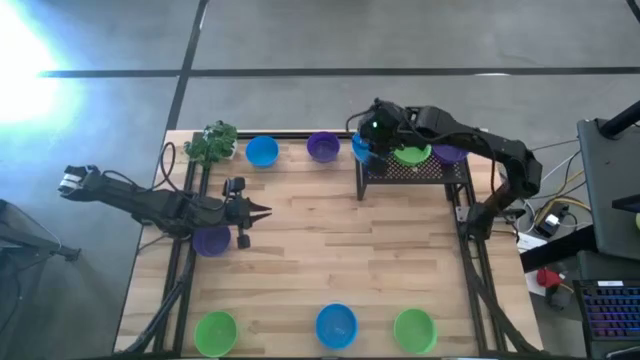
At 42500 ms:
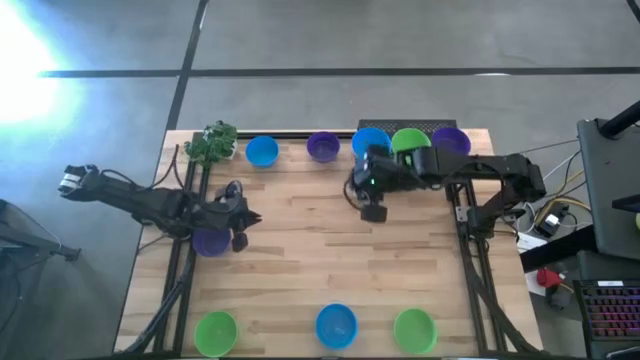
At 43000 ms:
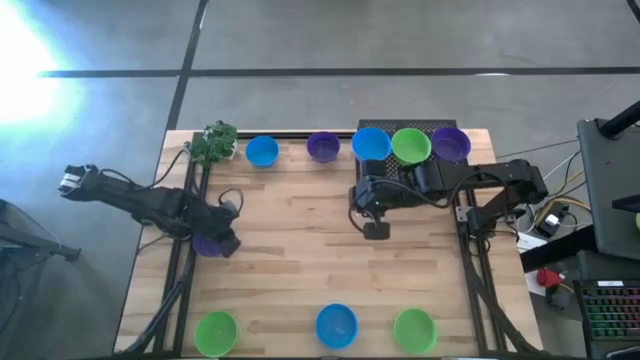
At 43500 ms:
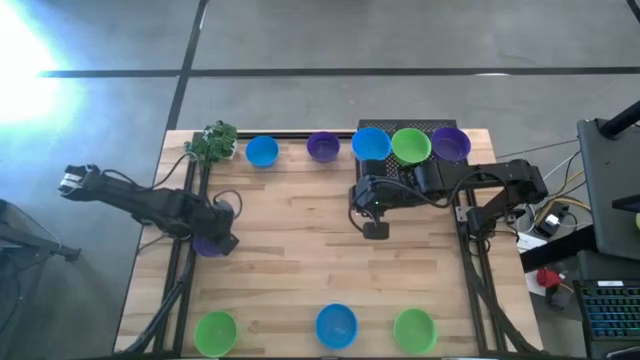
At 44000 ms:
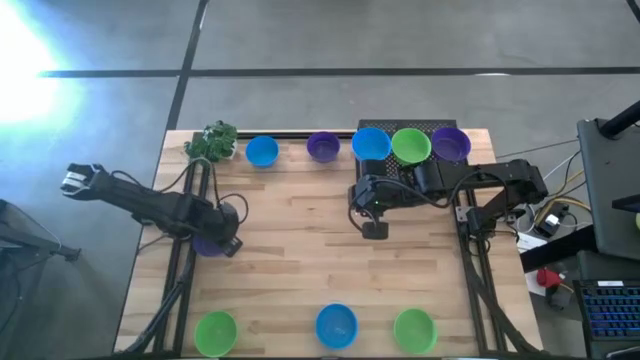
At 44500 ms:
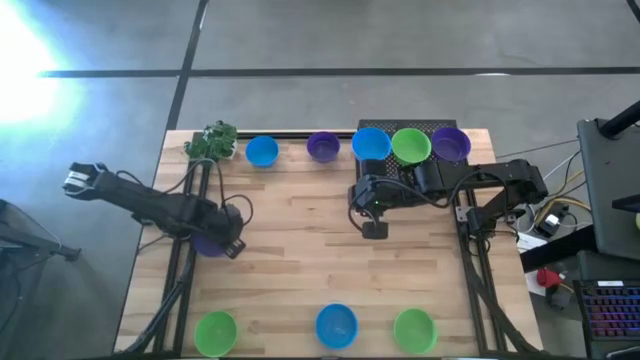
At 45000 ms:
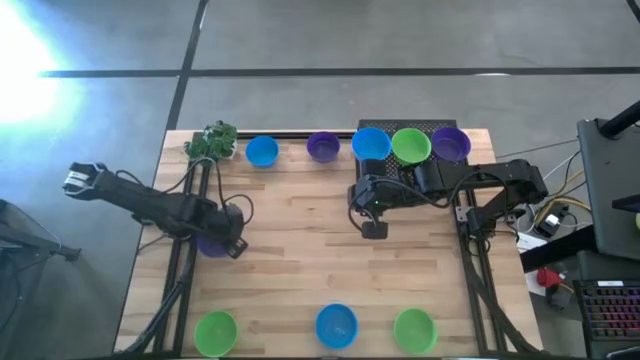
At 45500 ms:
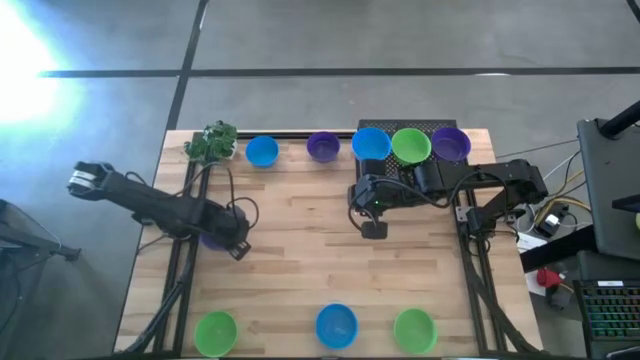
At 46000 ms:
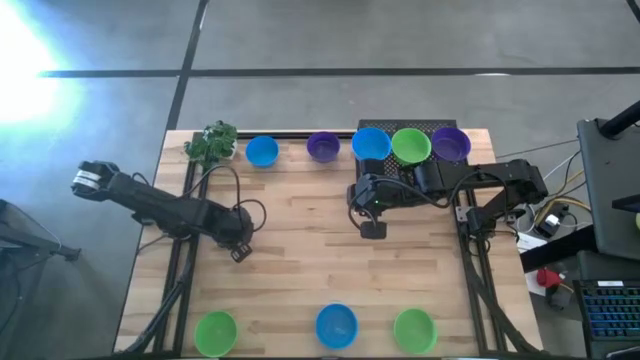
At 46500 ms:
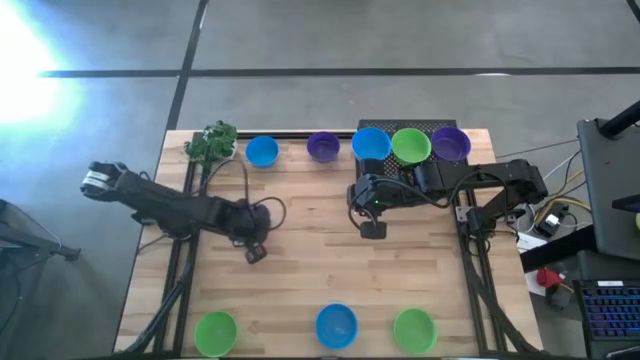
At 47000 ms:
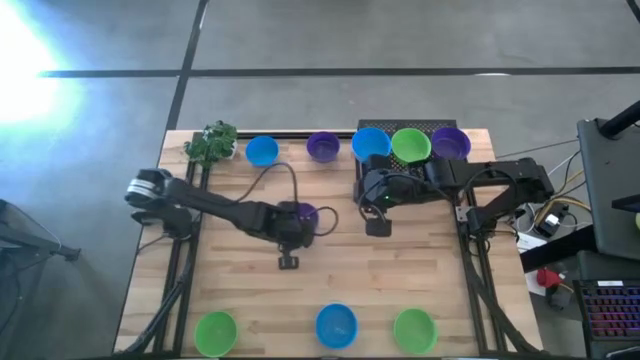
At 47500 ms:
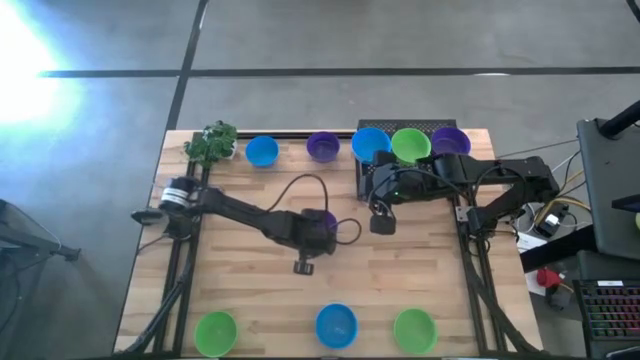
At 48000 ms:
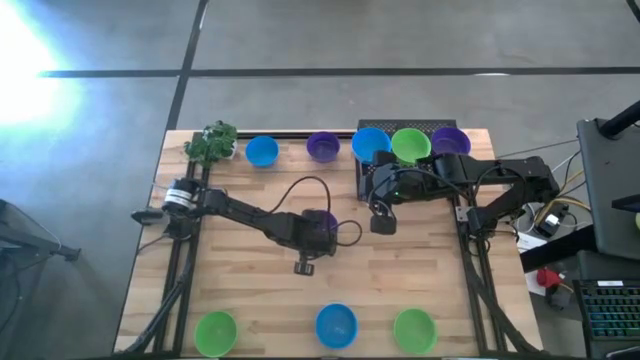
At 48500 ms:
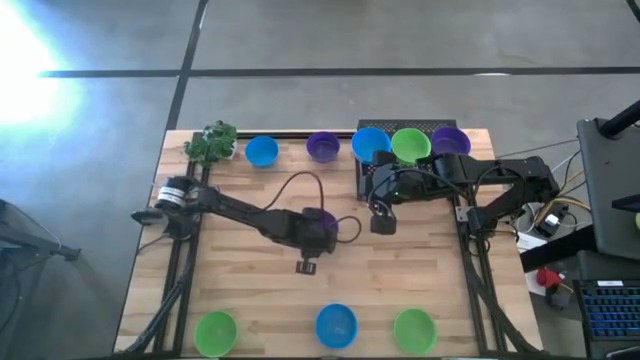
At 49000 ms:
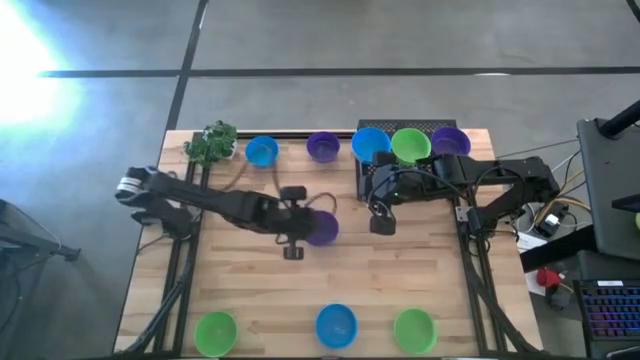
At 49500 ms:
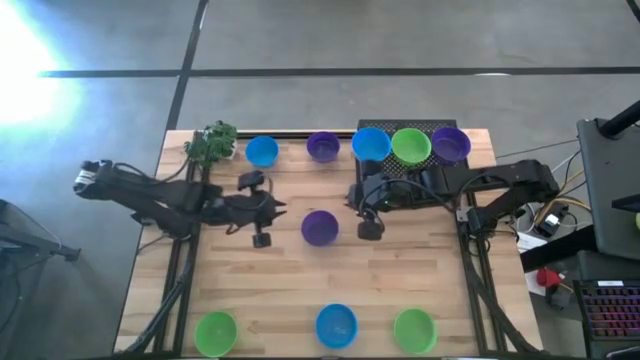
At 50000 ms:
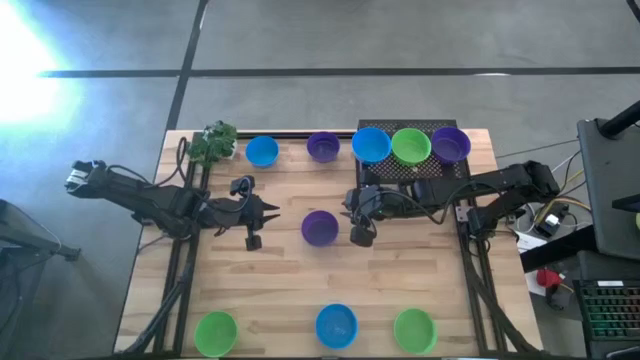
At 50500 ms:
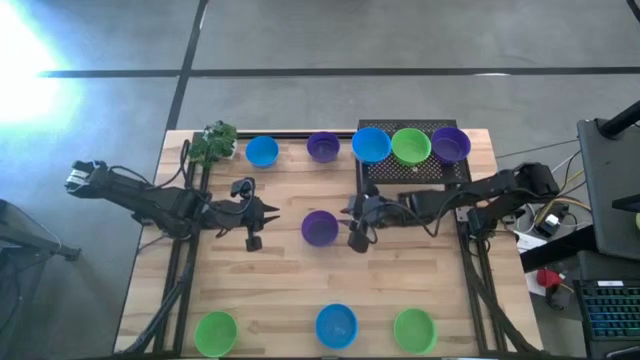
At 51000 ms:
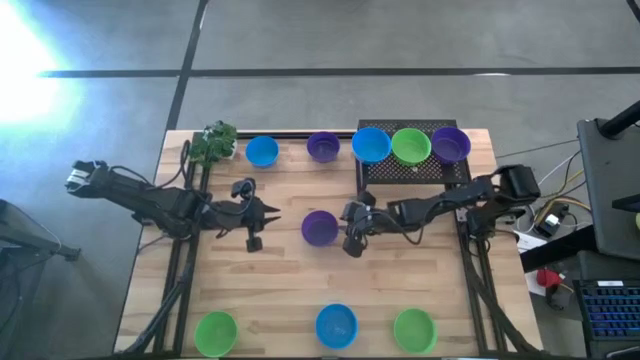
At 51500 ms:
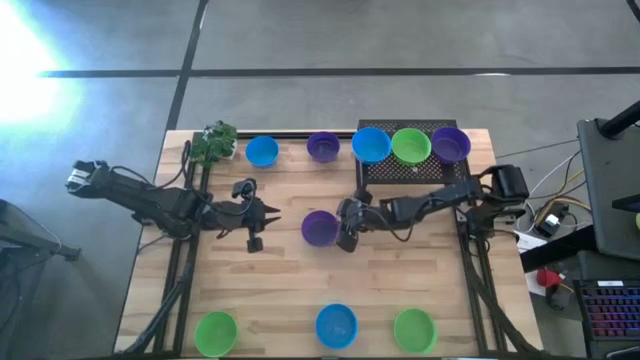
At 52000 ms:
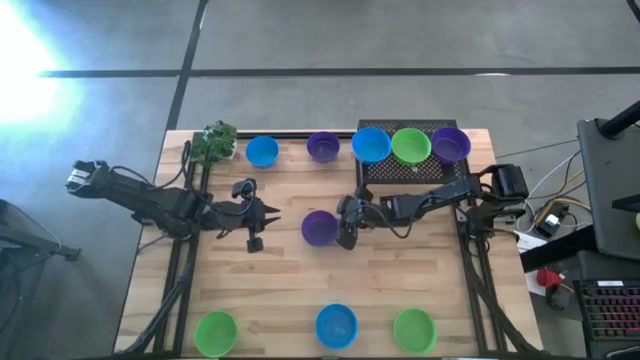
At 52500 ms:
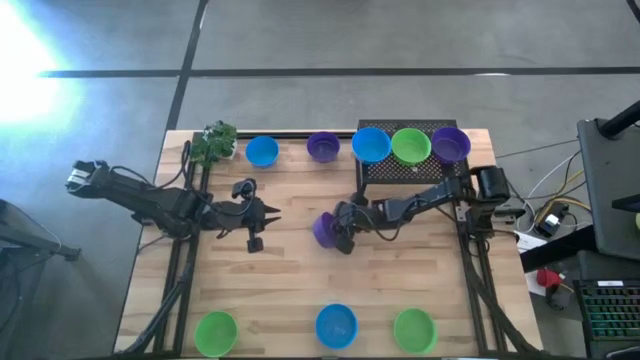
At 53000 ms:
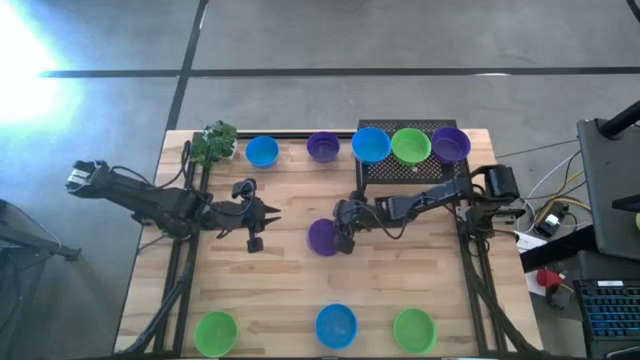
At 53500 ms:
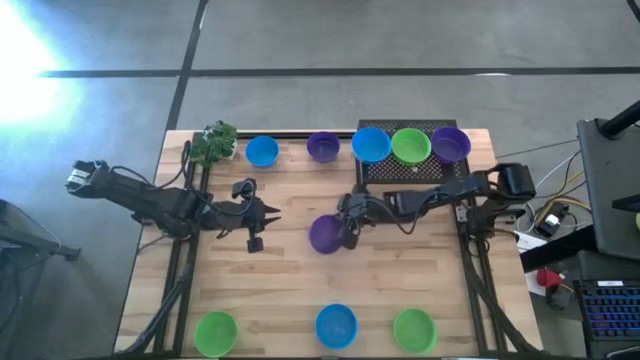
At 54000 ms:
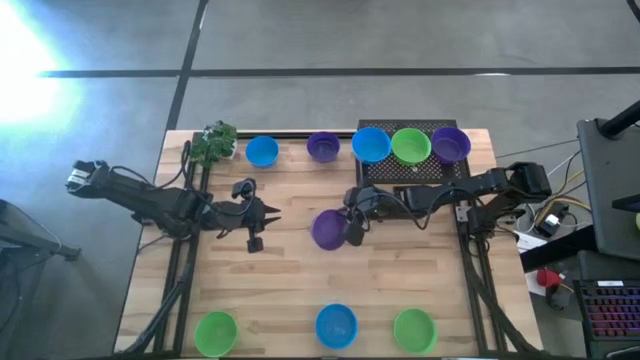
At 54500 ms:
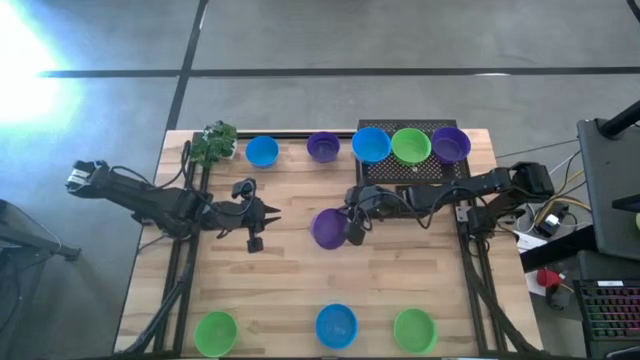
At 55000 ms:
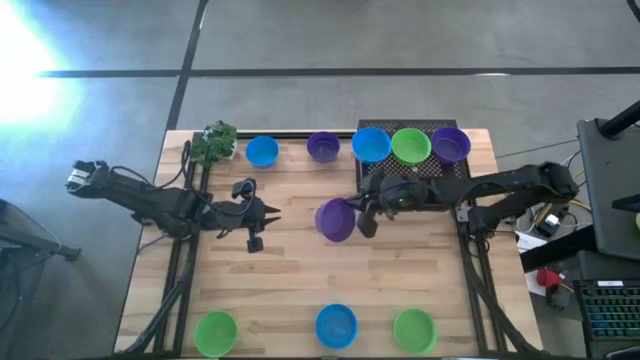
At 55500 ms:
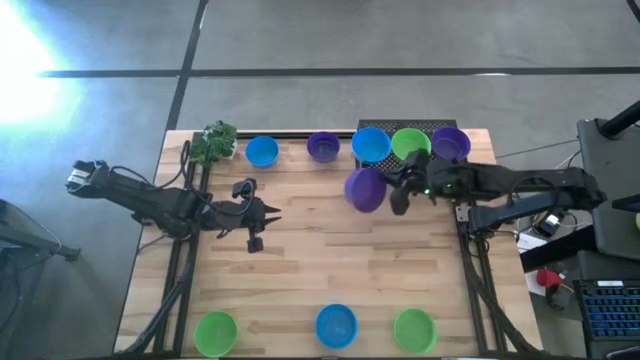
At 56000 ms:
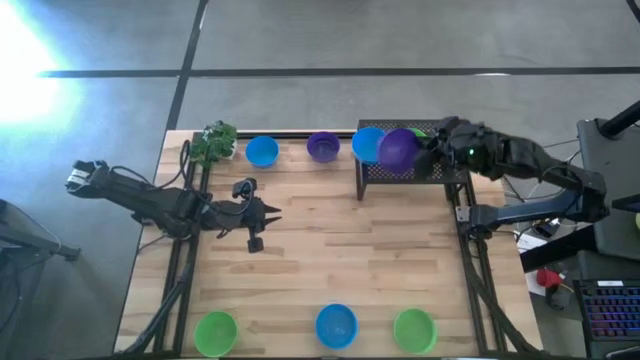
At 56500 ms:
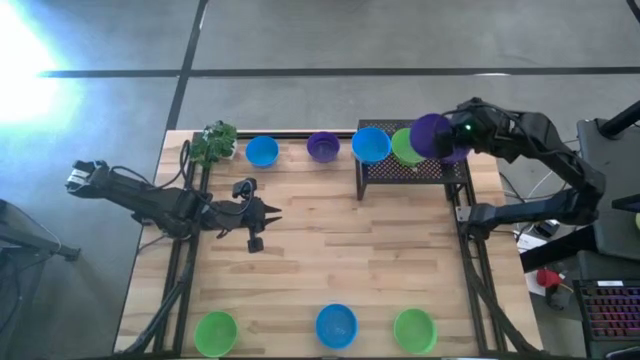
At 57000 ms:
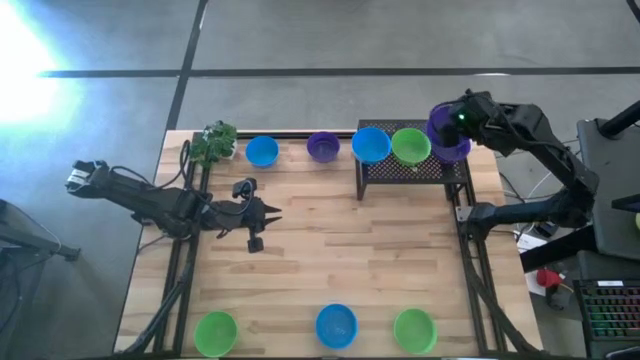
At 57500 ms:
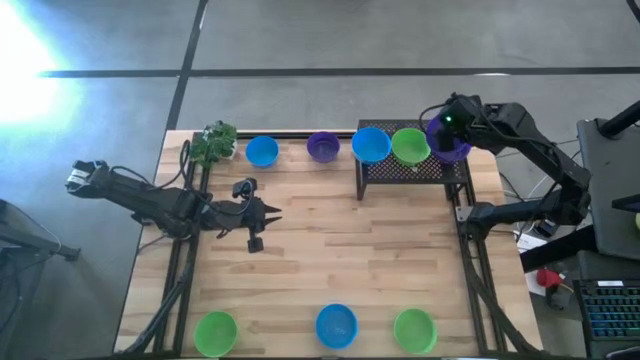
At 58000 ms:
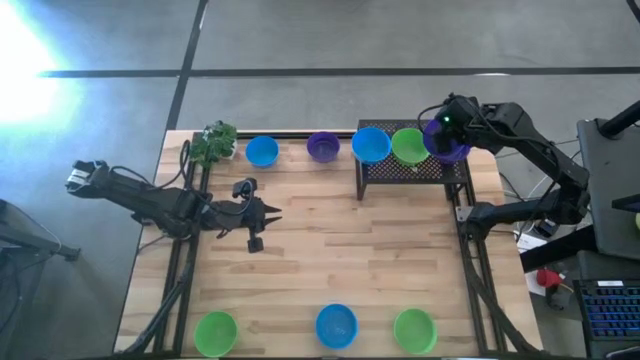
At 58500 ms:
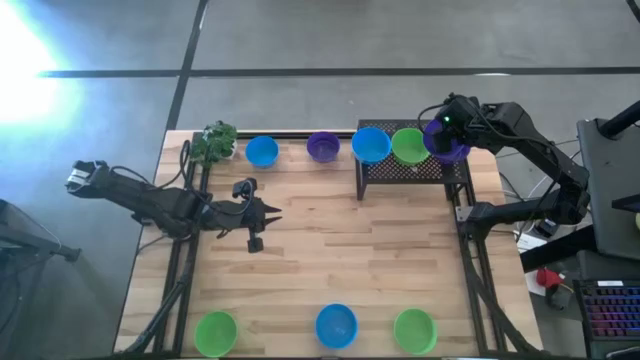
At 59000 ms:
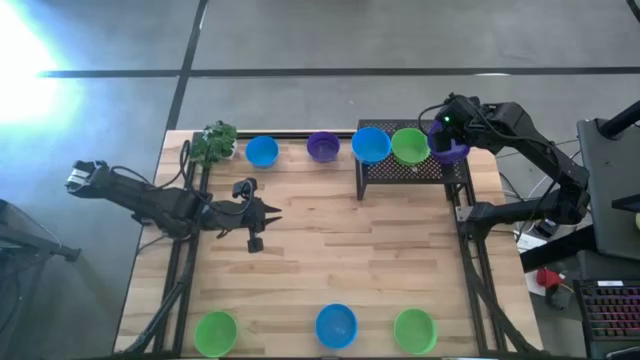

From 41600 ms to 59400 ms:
Task: Pick & Place Mini bowls
Stack the bottom purple bowl on the purple bowl on the shelf
